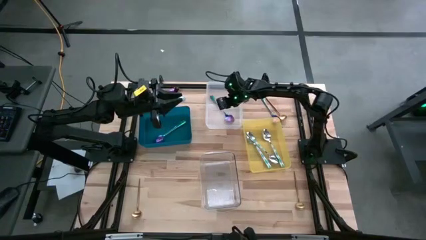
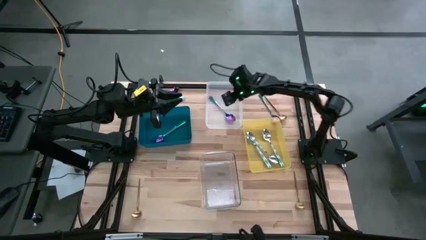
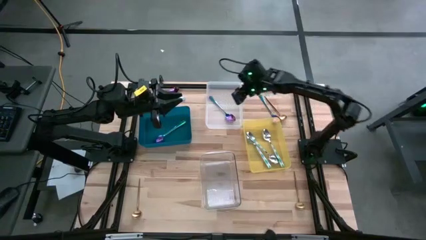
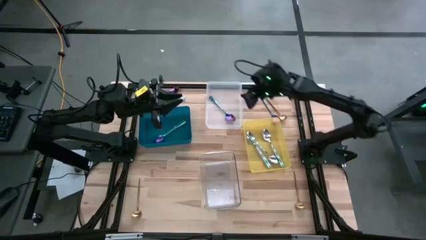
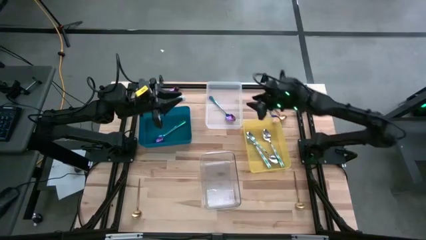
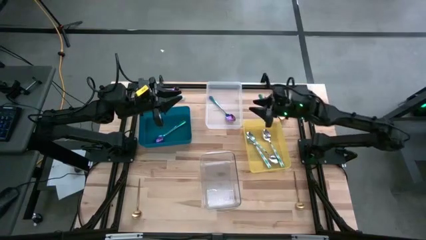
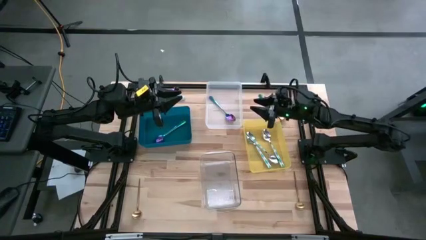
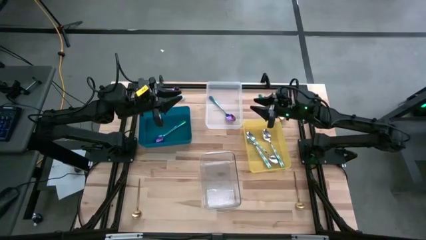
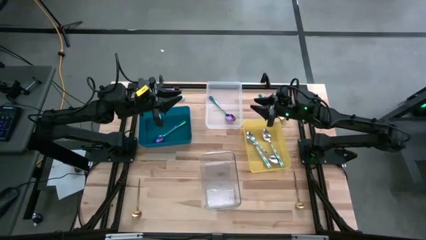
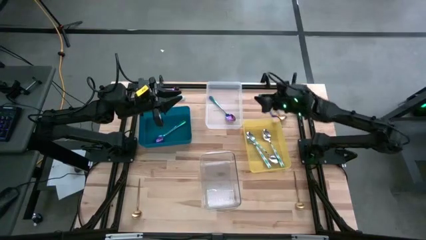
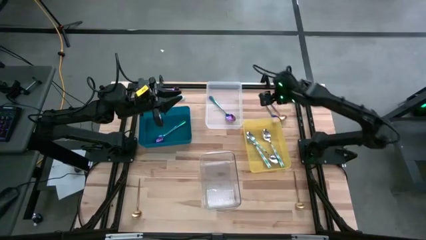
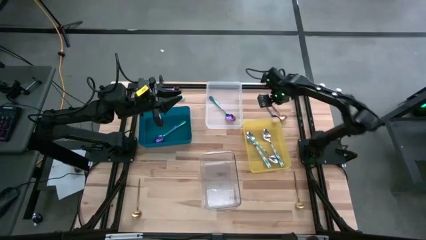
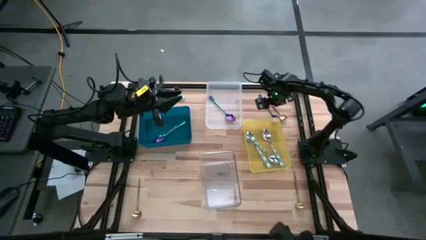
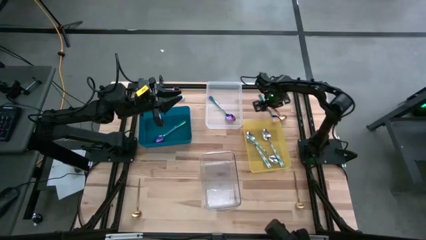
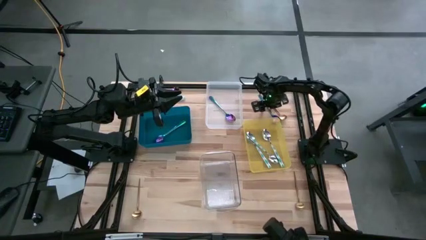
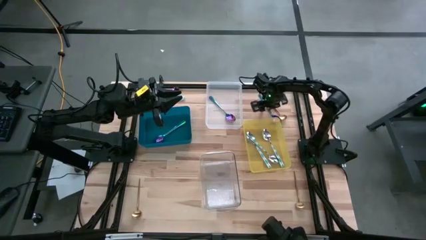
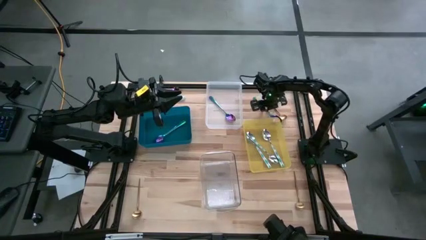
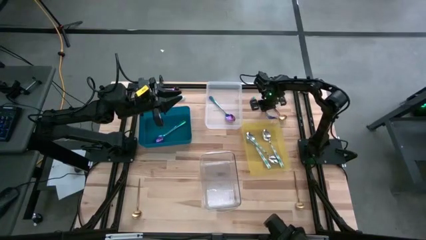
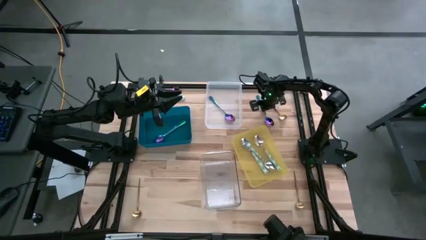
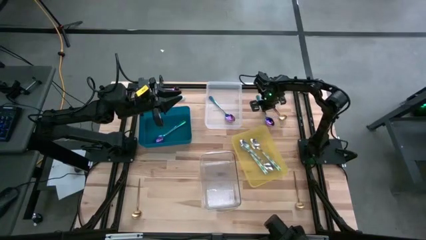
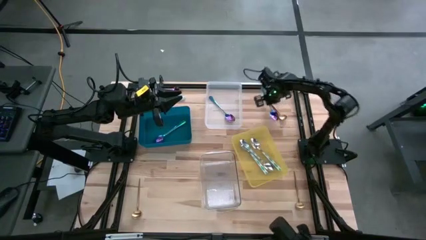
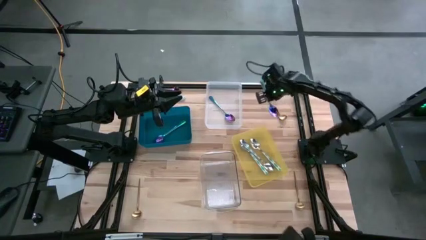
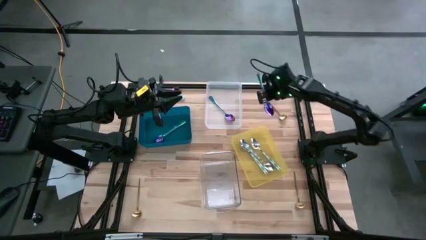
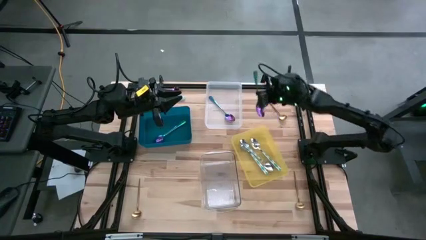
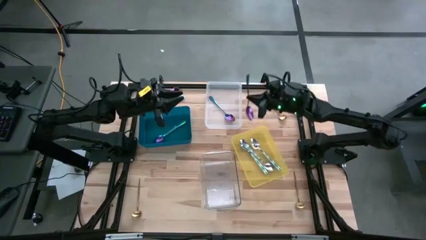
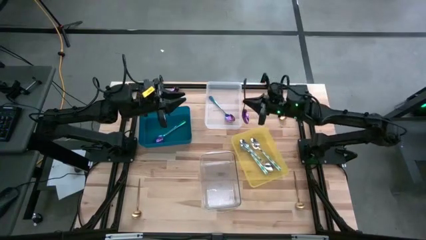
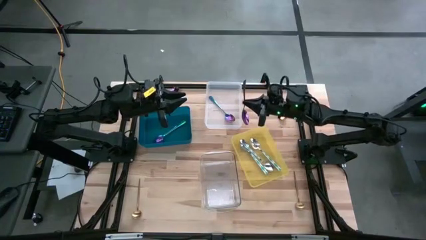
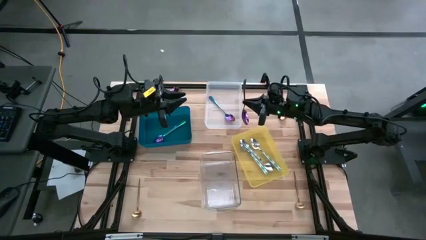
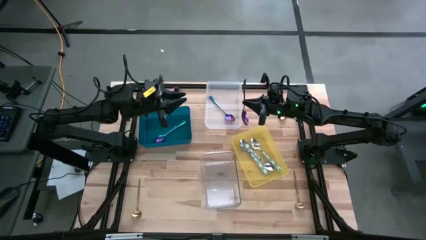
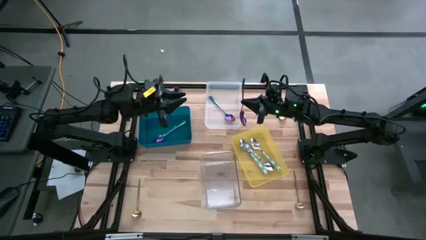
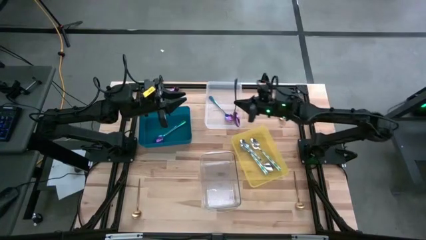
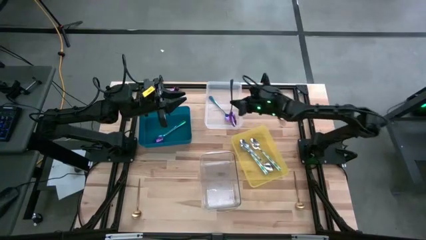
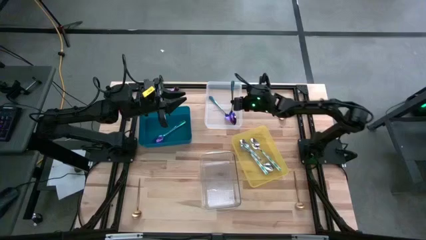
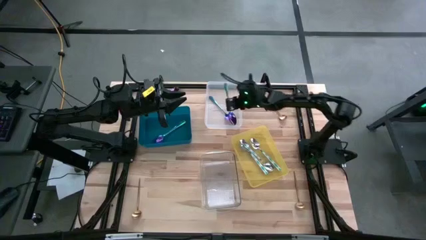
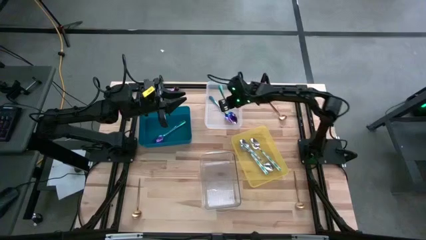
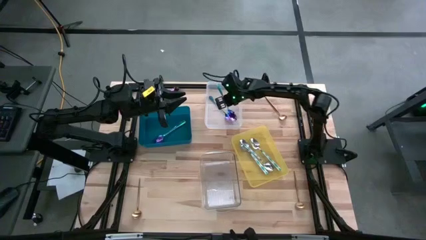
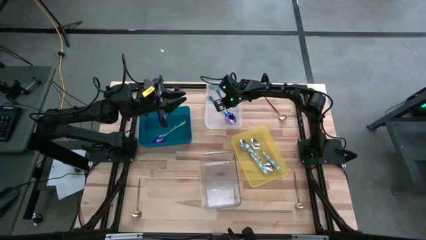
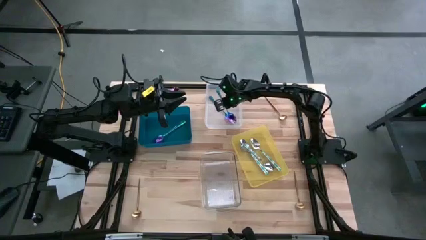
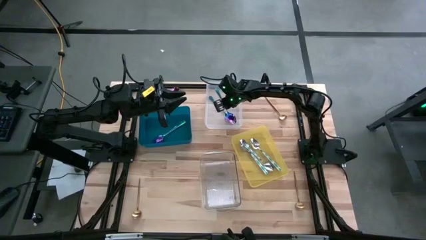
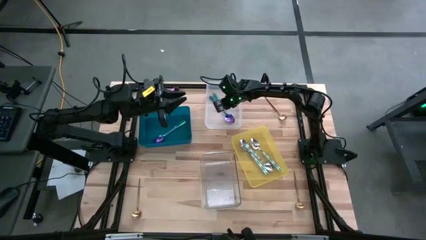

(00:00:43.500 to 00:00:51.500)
Task: Sort silverware by color (type)
Put the violet spoon into the white bin

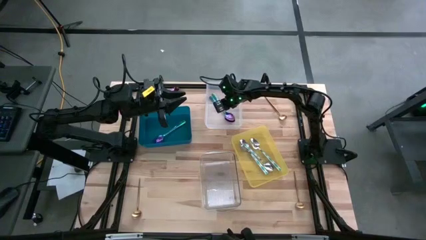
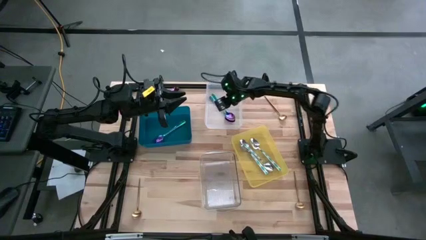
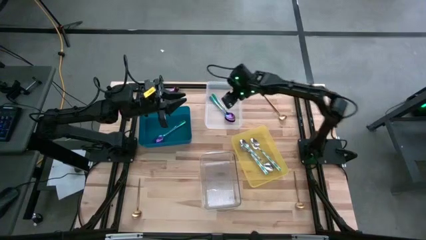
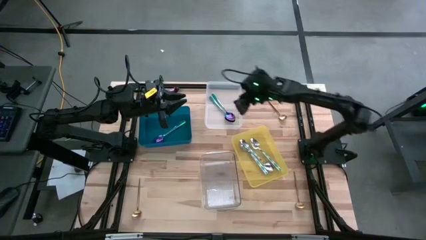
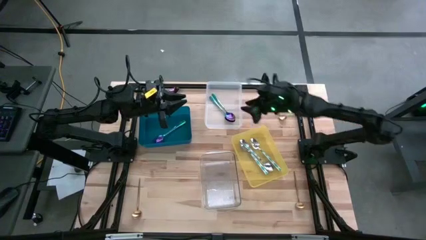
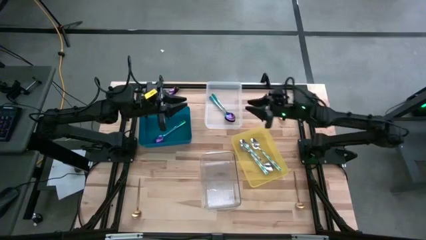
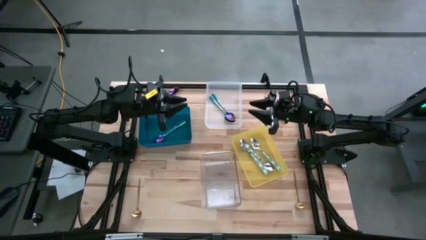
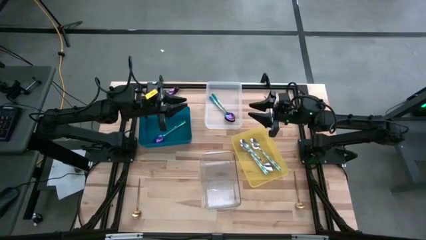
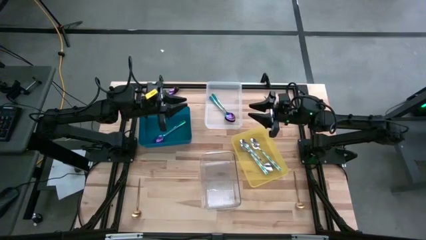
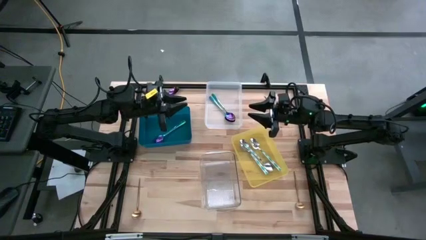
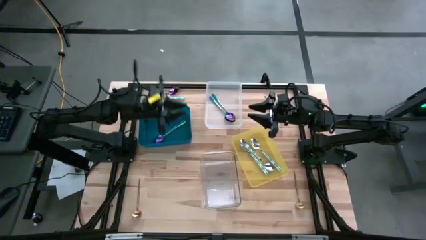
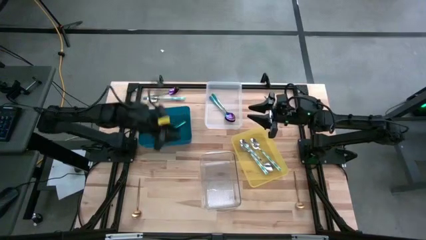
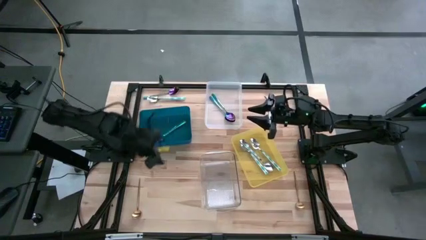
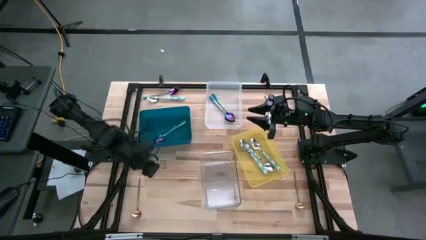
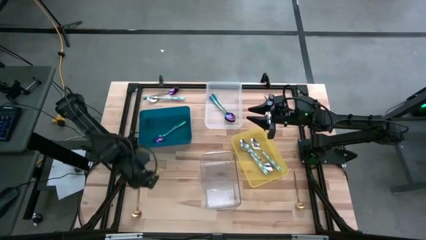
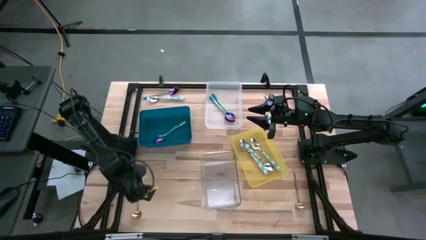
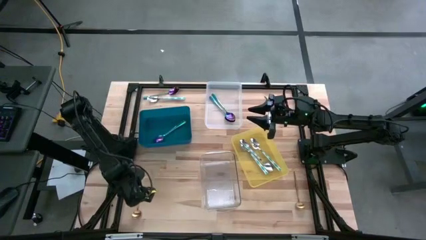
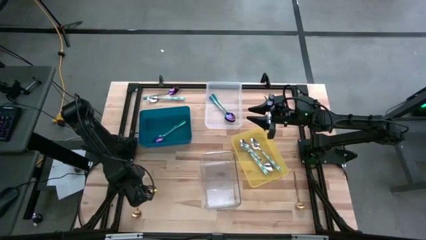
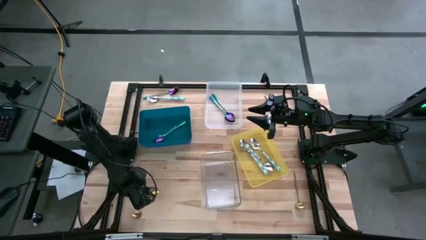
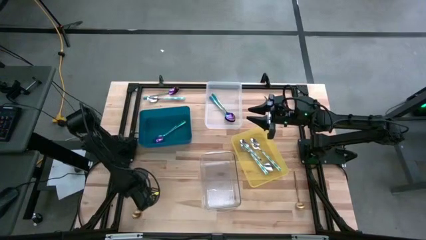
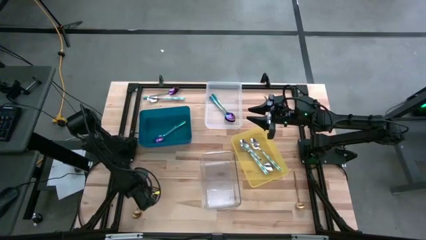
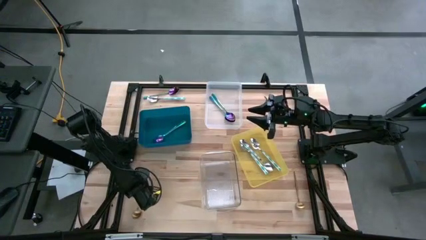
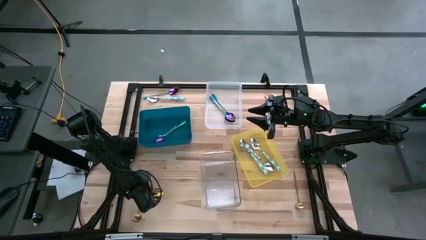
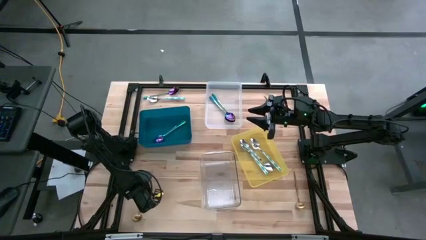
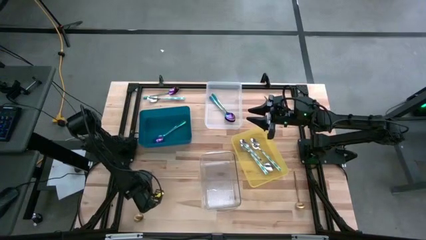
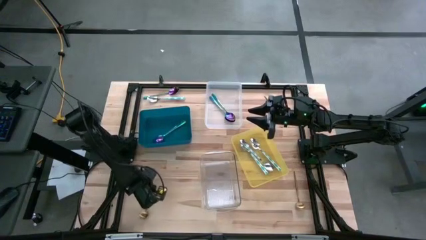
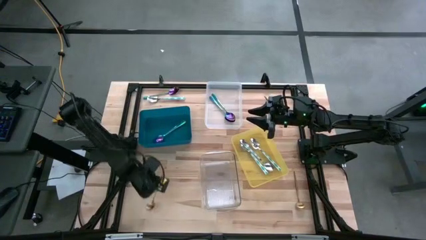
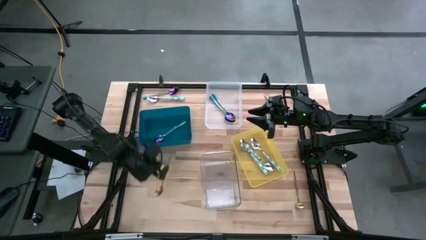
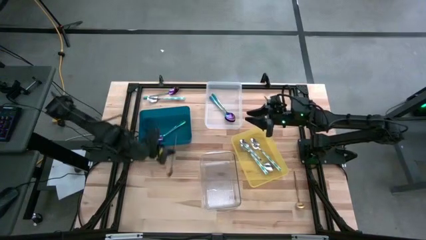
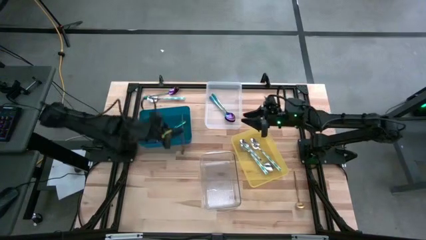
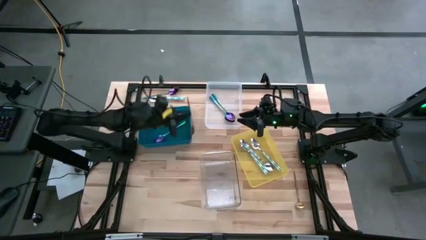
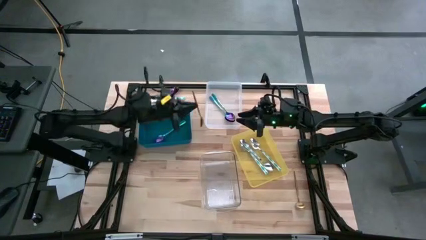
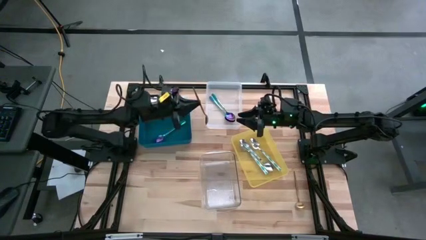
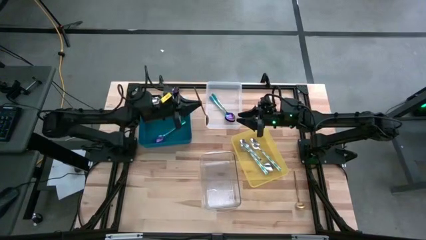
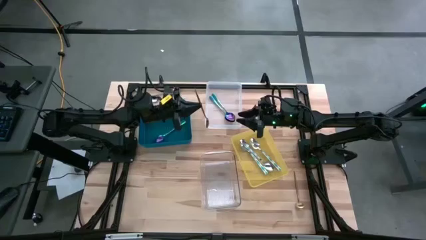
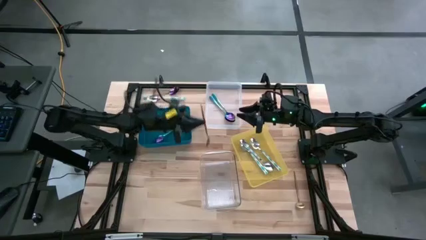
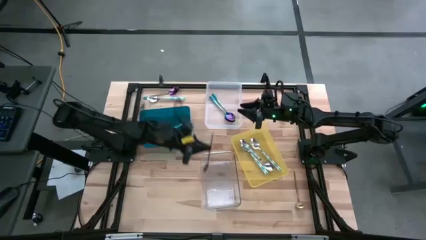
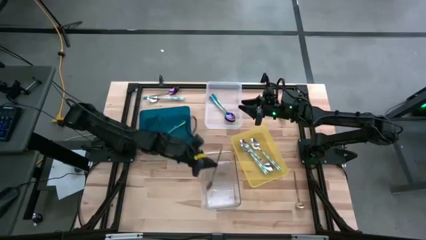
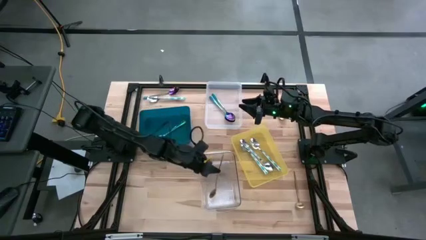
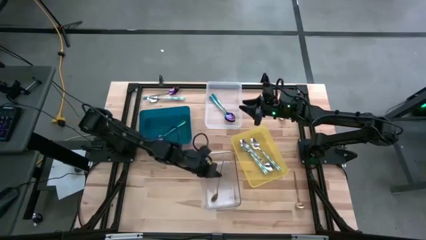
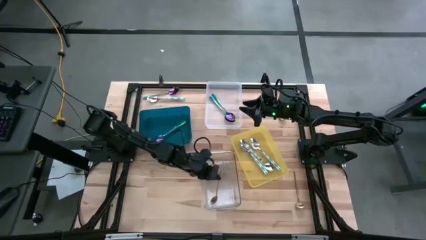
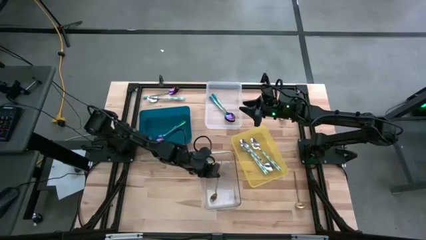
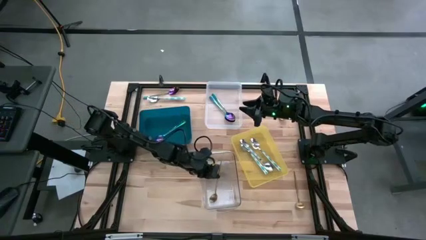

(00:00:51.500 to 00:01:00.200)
Put the gold spoon into the transparent bin
